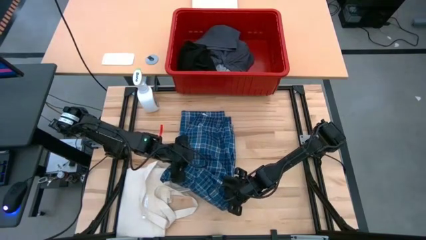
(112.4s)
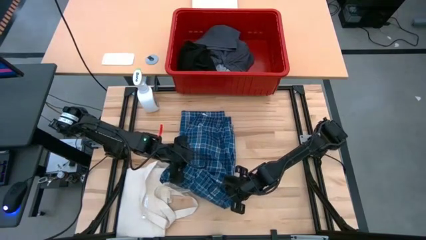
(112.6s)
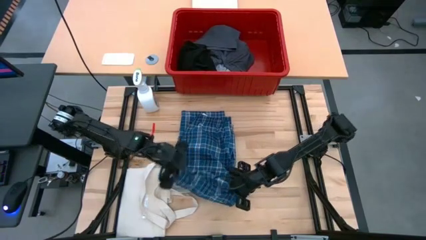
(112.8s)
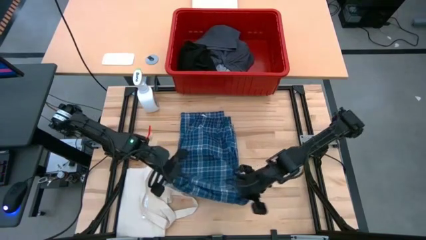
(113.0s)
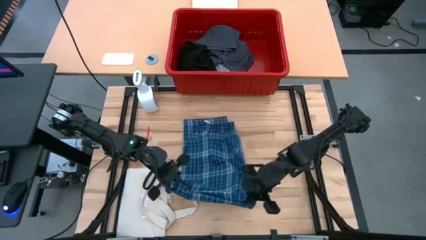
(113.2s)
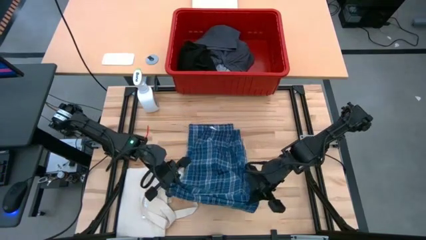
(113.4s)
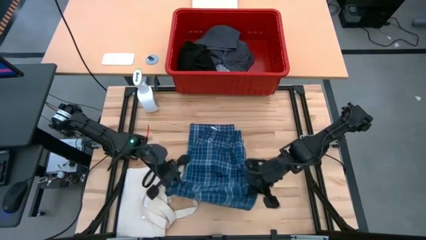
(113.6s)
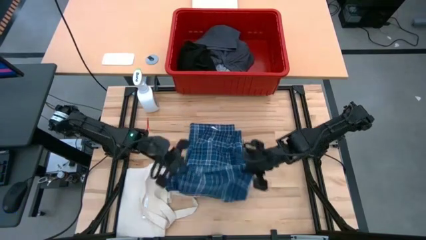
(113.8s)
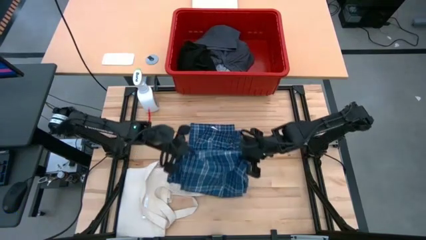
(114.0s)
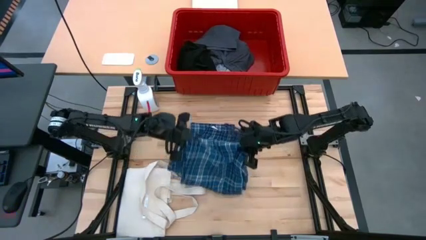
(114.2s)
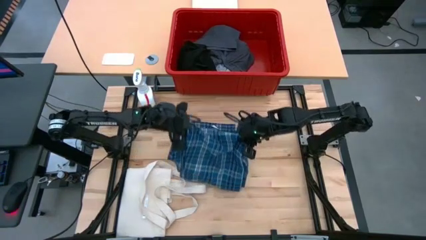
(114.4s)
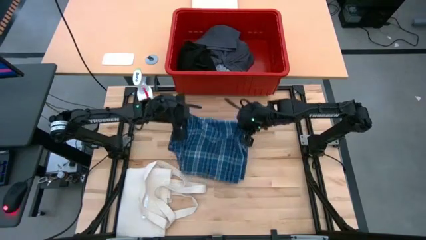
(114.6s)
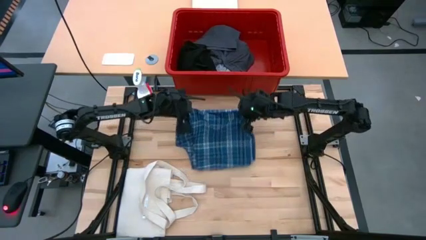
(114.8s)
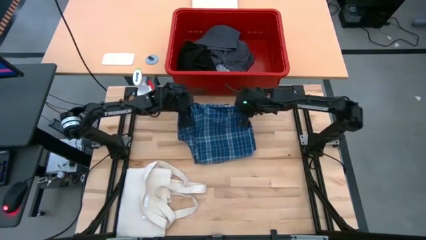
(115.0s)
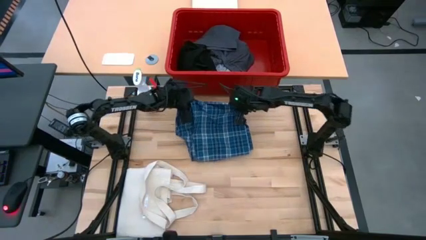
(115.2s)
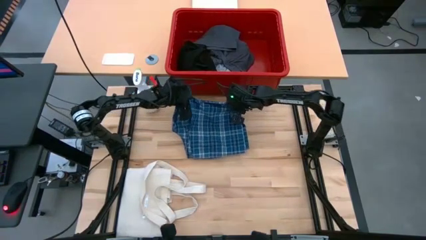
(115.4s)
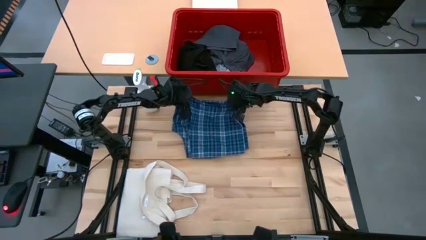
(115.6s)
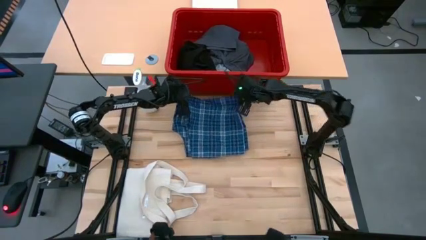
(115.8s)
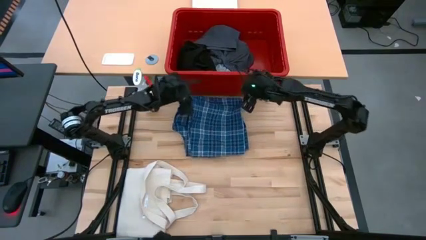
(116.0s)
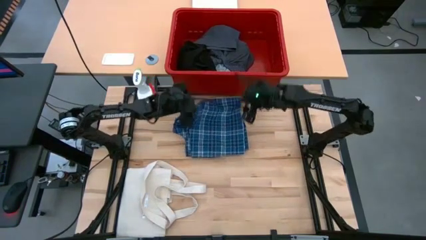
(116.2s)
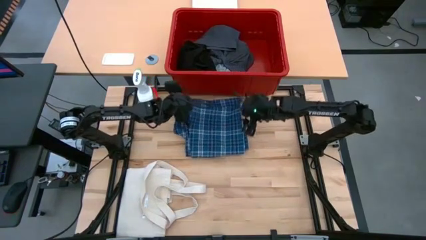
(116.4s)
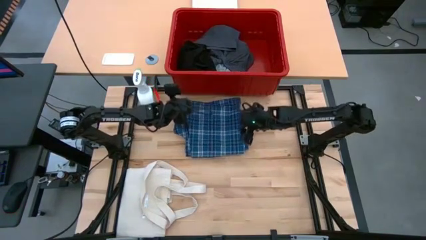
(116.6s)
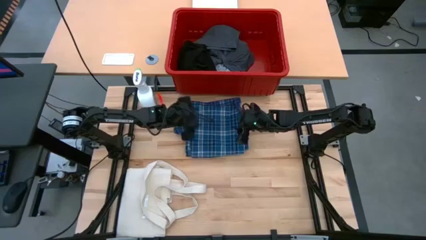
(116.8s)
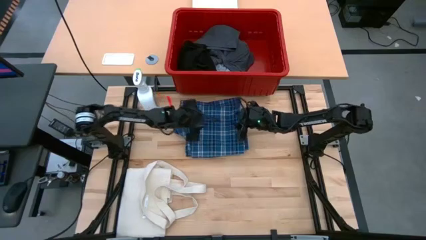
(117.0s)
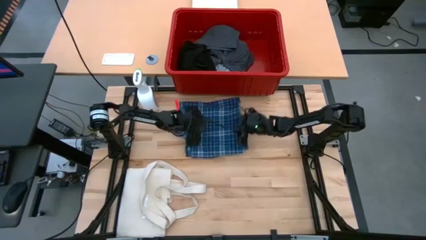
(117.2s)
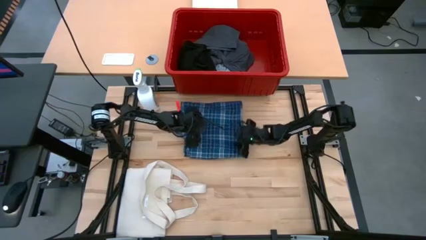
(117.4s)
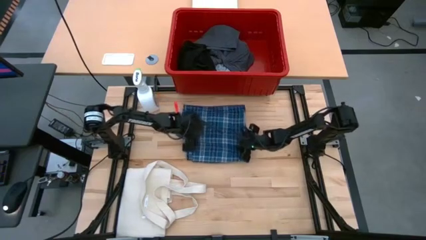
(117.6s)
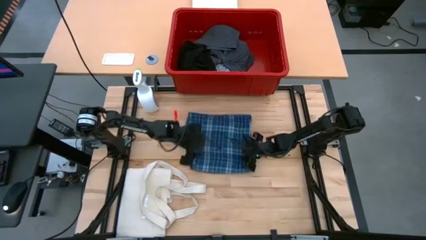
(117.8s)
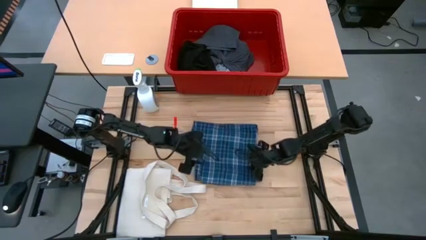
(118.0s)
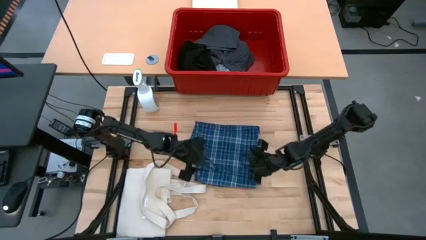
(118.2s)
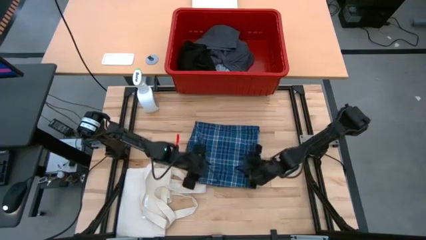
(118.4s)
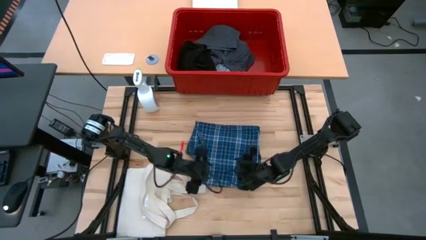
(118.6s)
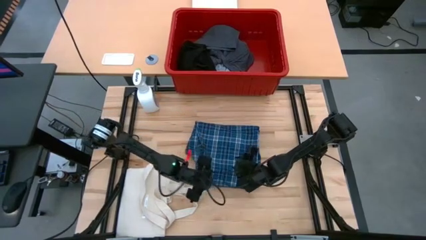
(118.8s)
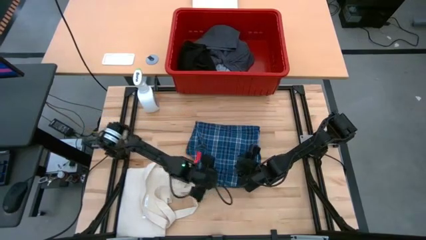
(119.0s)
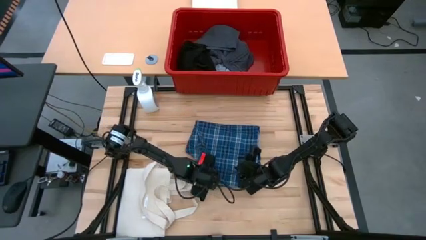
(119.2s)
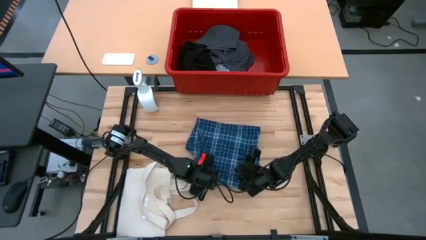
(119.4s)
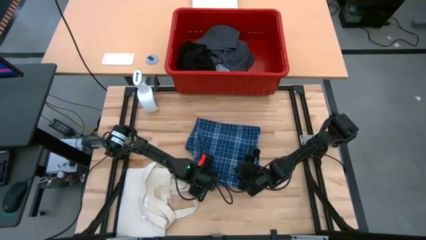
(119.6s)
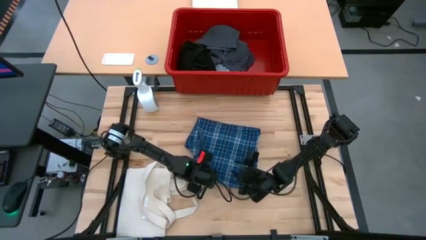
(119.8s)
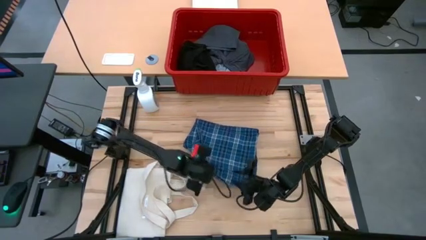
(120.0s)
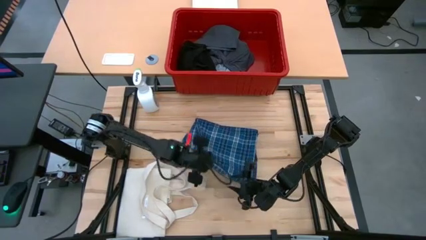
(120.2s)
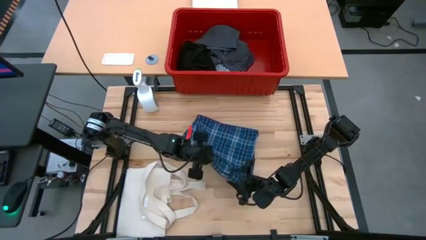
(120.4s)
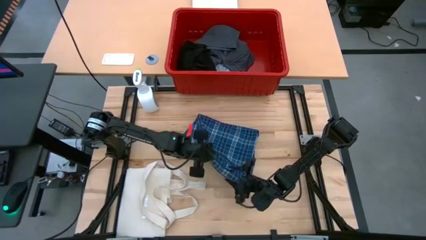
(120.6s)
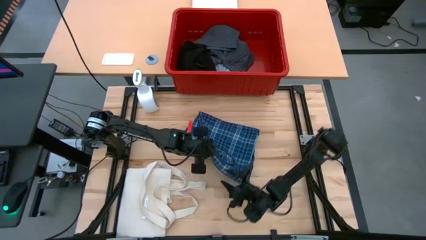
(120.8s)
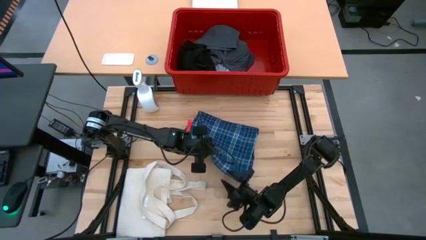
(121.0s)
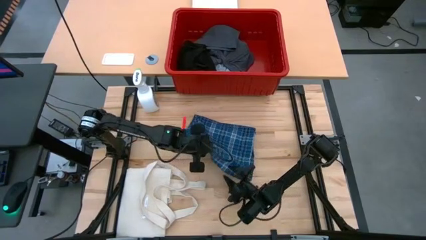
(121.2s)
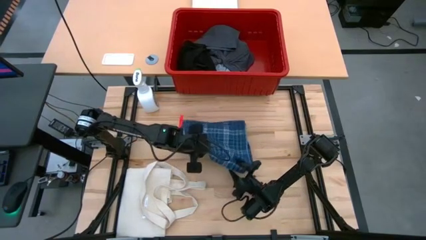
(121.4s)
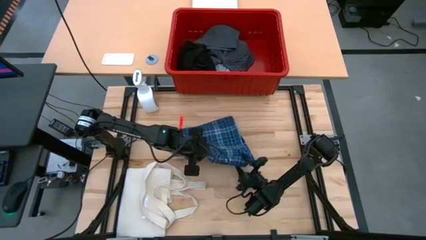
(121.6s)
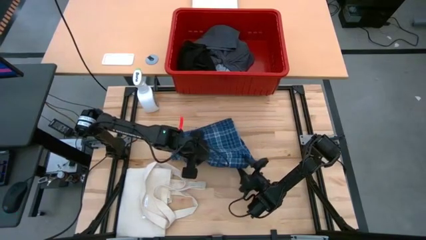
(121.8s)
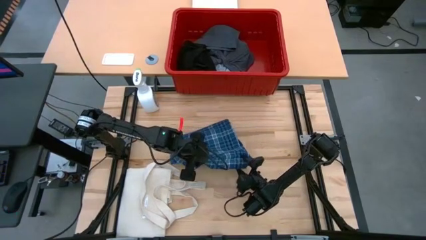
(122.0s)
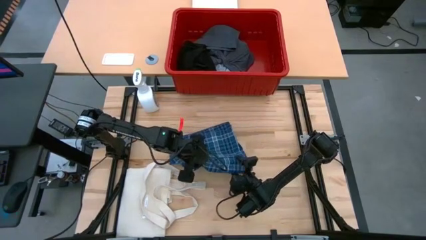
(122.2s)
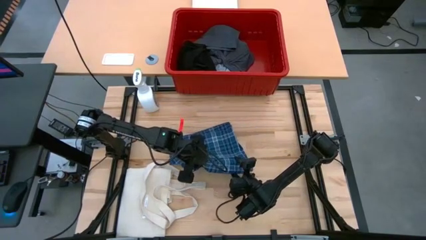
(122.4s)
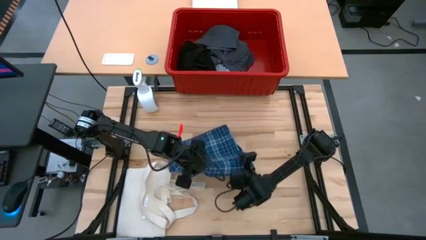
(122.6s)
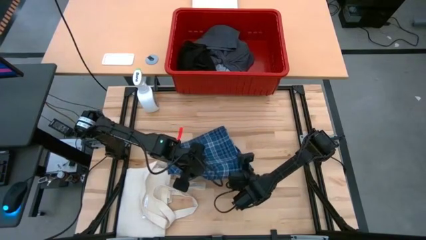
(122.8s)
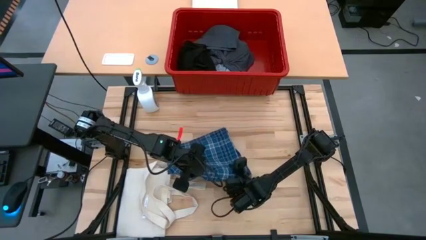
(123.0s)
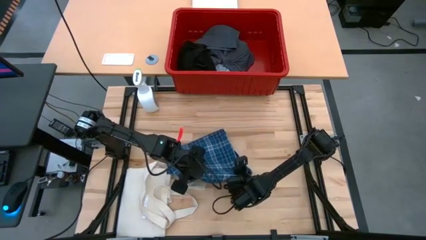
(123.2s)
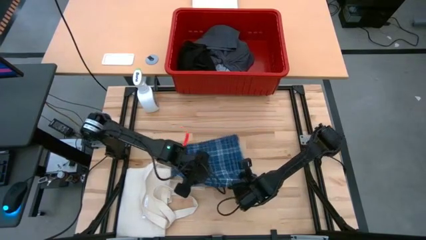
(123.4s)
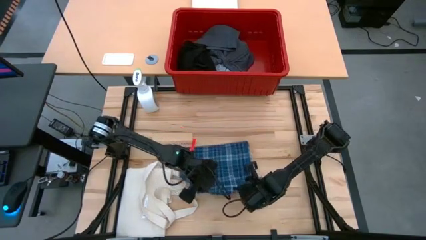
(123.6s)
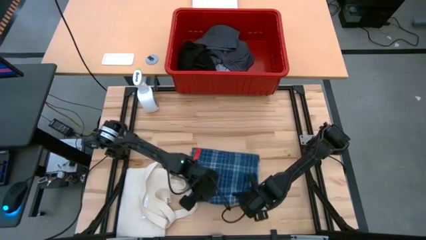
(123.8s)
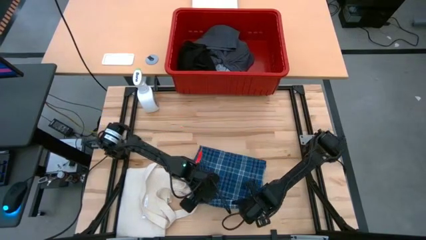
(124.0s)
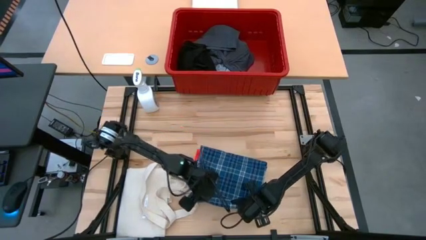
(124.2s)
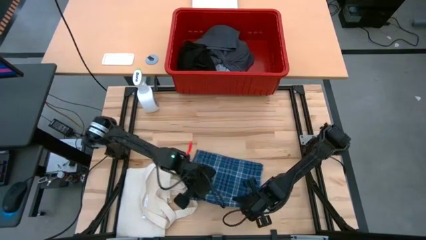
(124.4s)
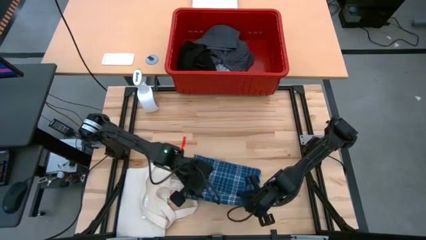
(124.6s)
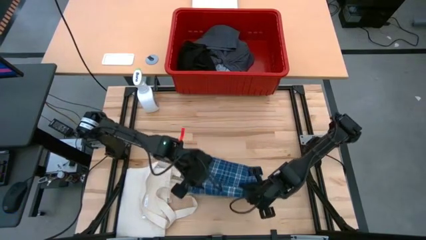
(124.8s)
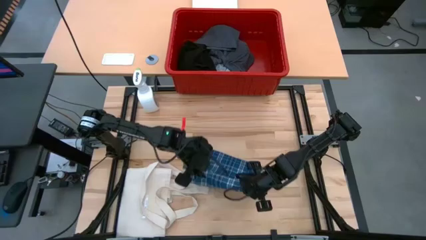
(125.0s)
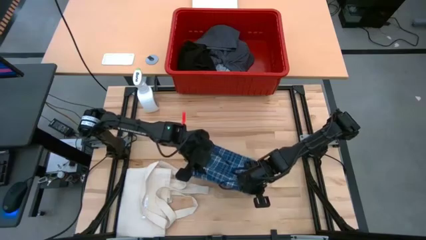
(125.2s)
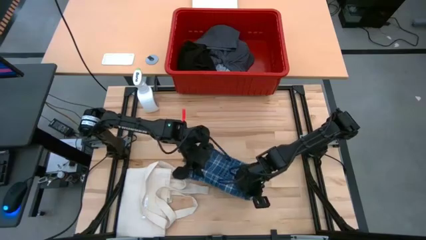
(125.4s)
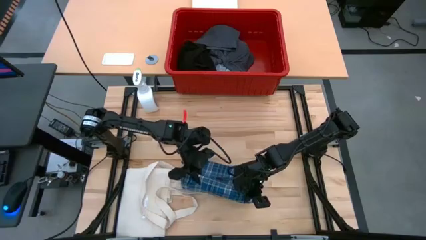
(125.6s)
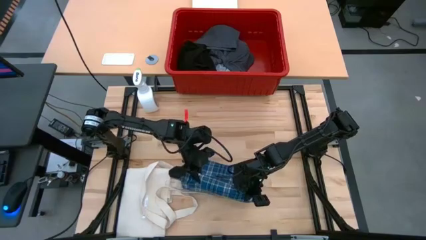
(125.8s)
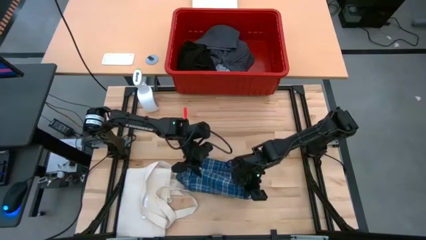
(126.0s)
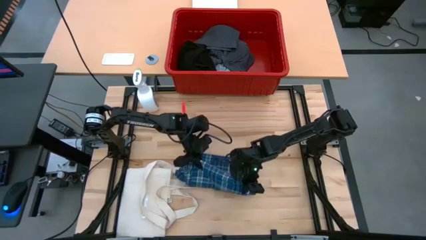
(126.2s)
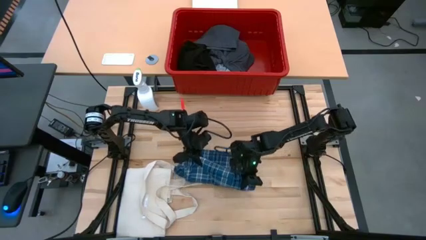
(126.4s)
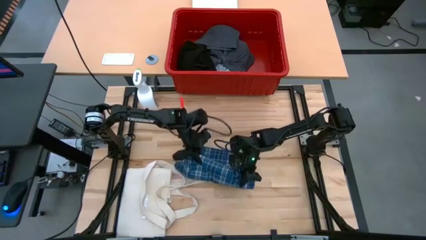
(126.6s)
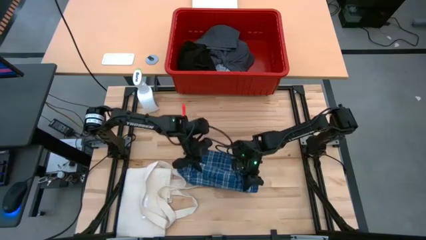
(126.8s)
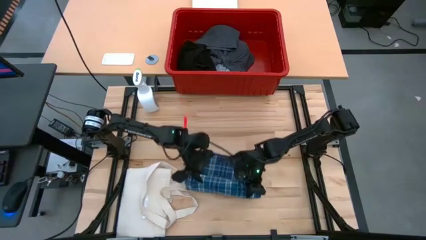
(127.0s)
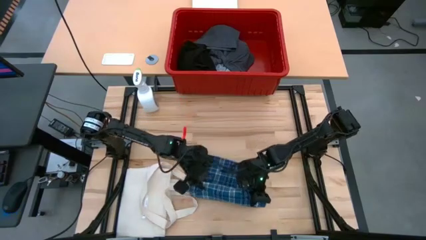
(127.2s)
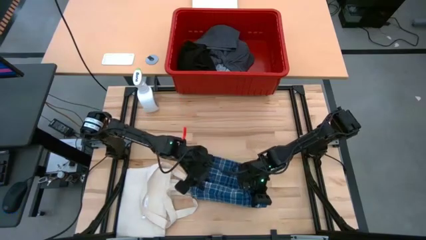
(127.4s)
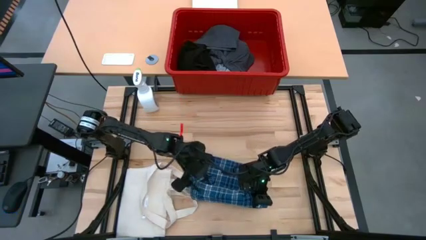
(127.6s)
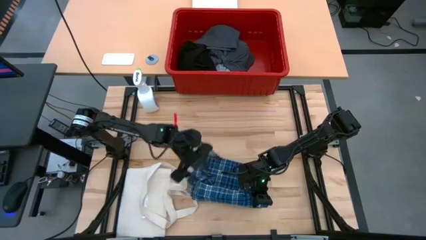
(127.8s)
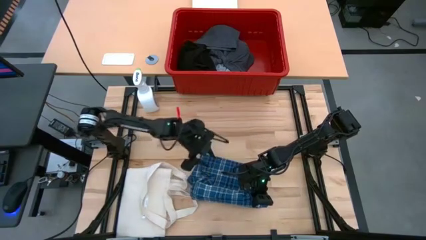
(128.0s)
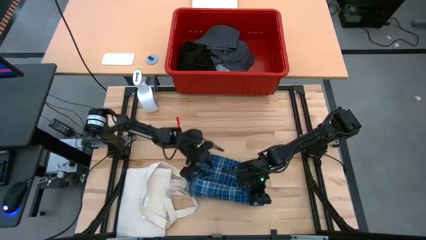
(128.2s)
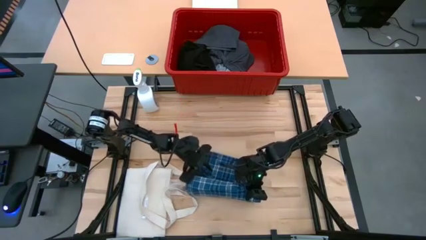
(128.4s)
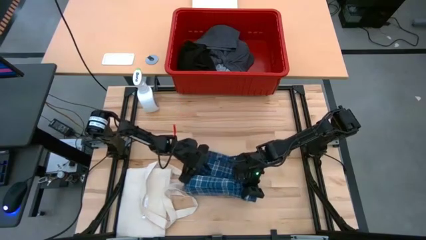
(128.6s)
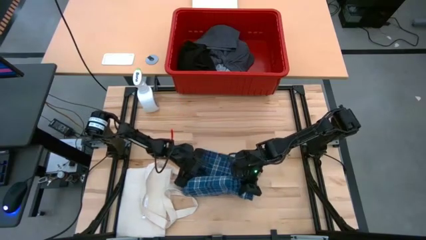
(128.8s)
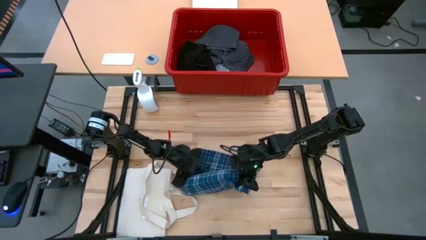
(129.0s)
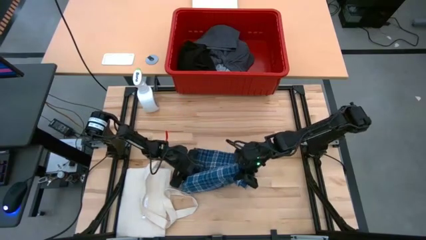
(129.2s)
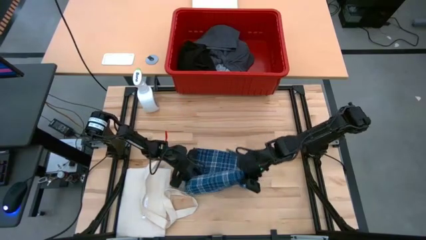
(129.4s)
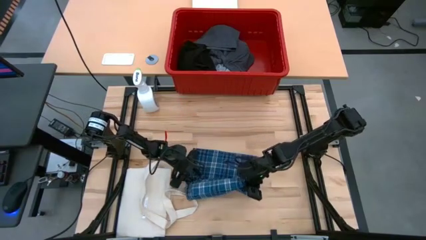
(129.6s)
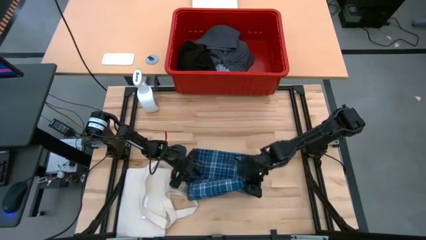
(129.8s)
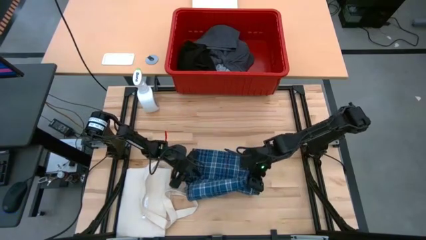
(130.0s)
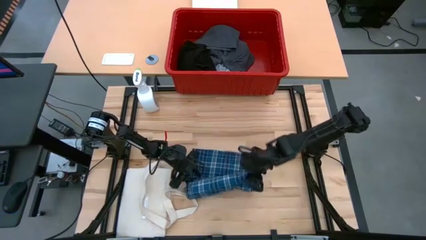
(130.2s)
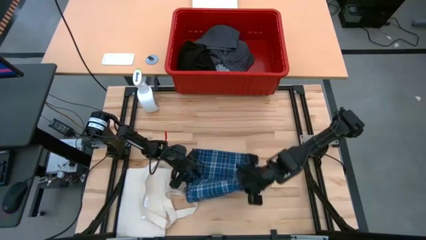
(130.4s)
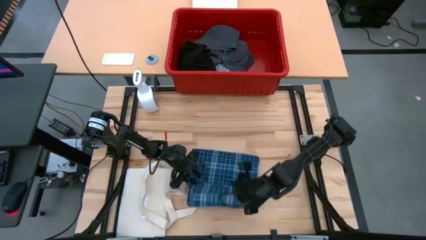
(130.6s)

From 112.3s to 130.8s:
Task: Fold Laundry from Bin
Fold the blue pants
